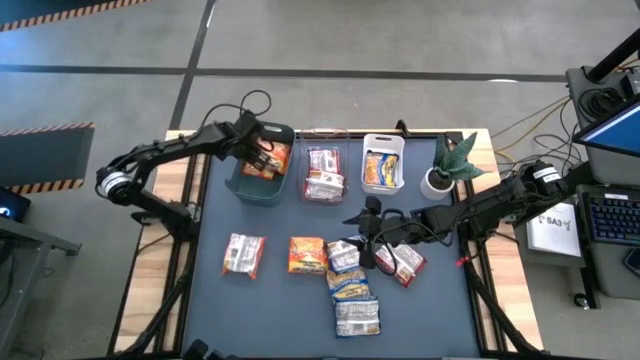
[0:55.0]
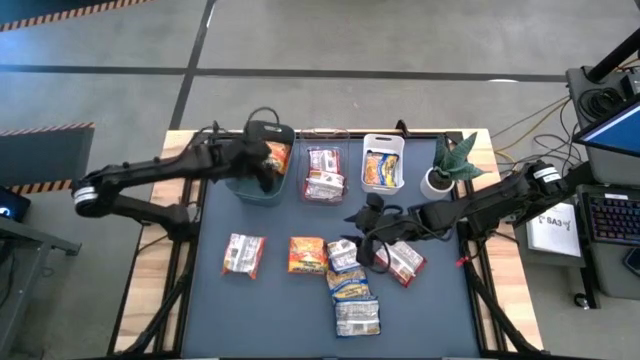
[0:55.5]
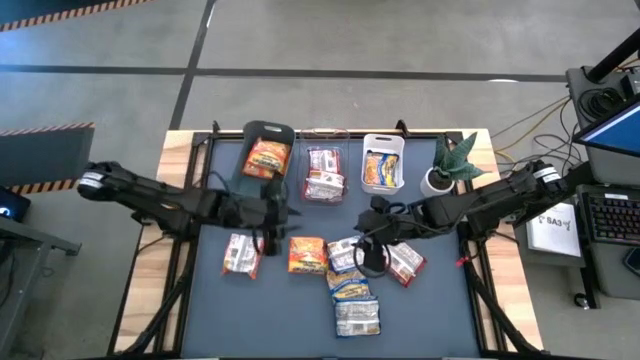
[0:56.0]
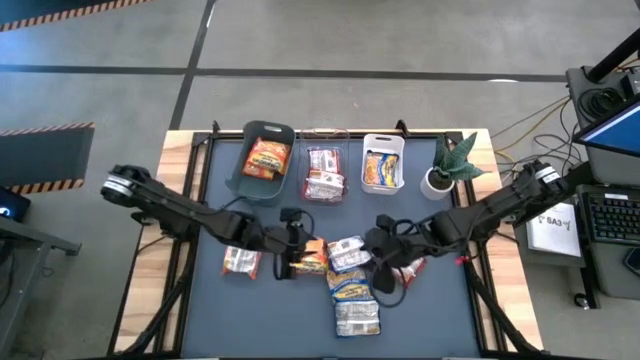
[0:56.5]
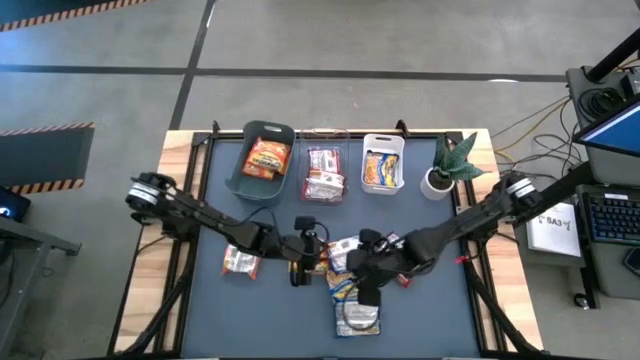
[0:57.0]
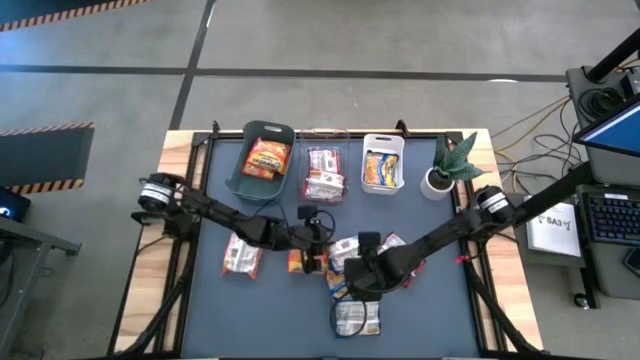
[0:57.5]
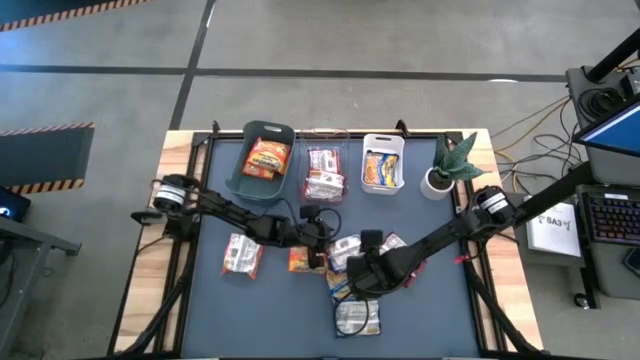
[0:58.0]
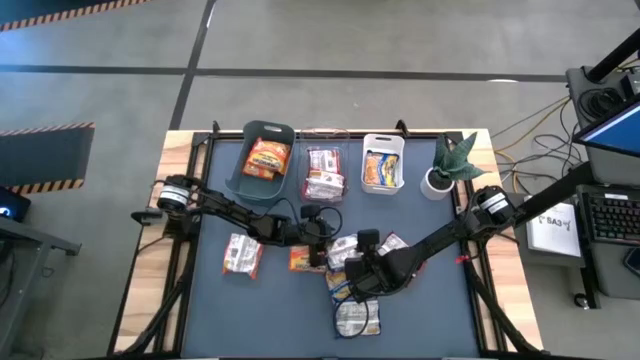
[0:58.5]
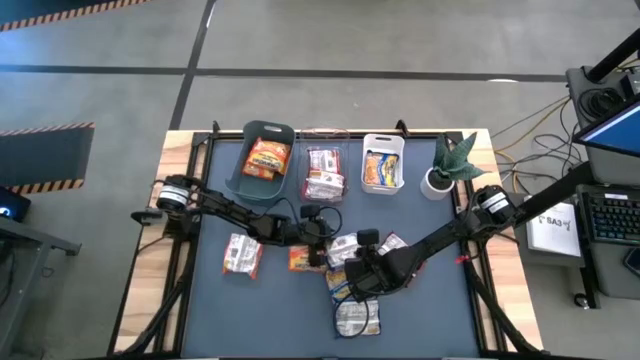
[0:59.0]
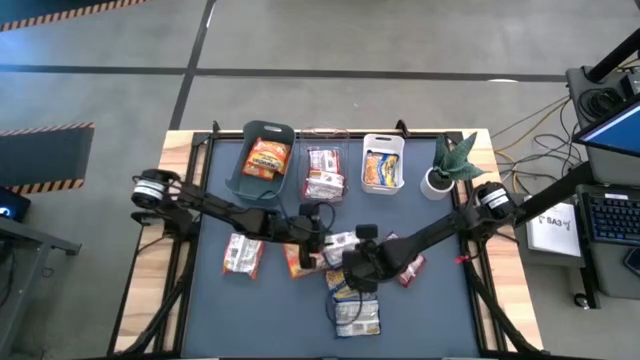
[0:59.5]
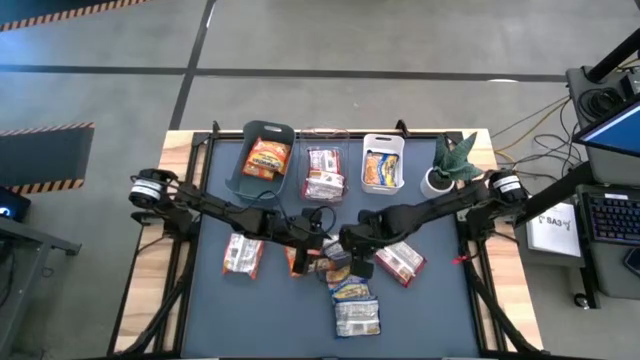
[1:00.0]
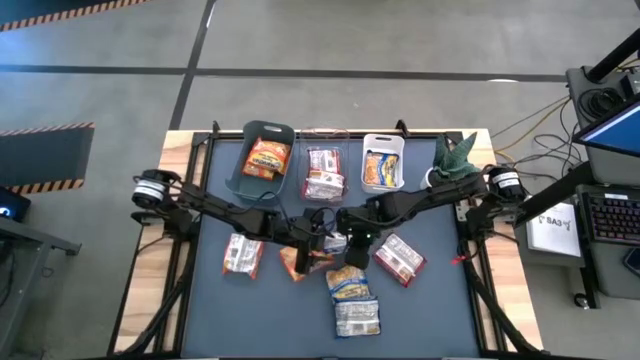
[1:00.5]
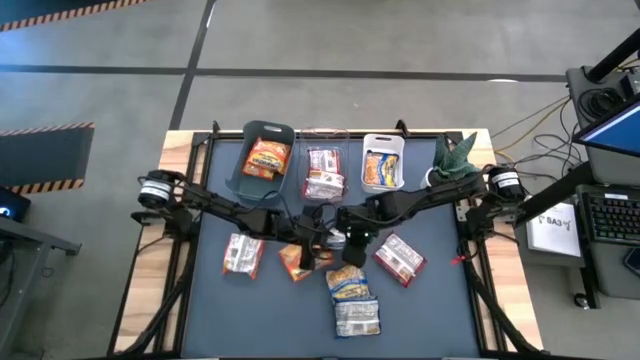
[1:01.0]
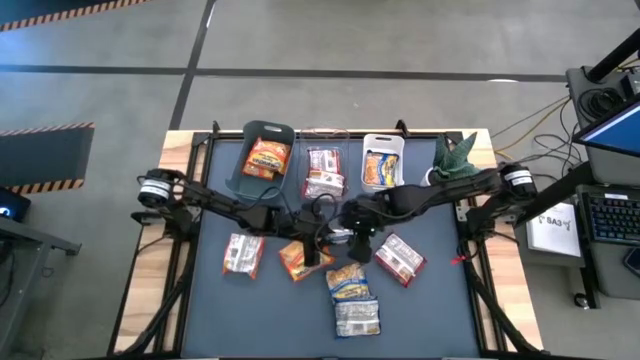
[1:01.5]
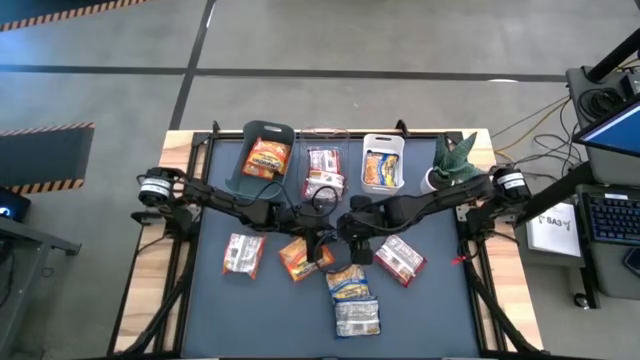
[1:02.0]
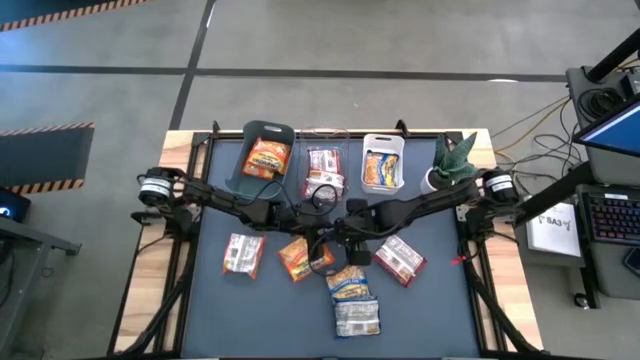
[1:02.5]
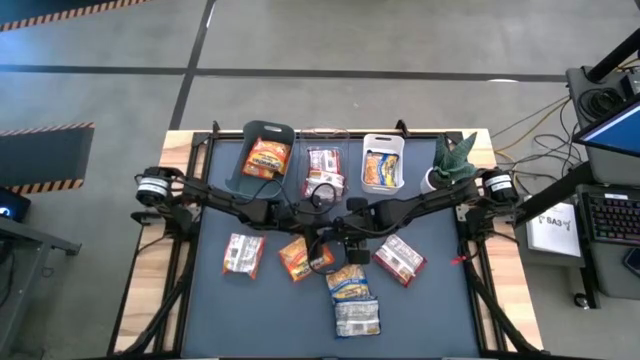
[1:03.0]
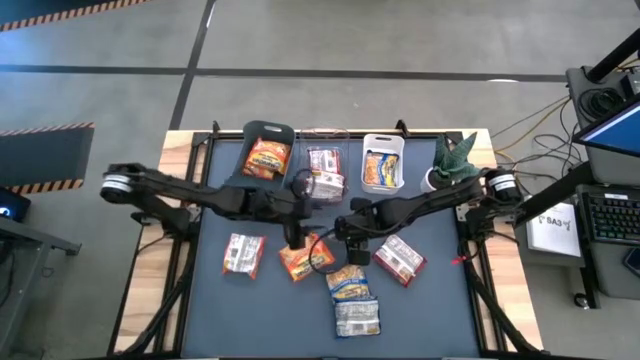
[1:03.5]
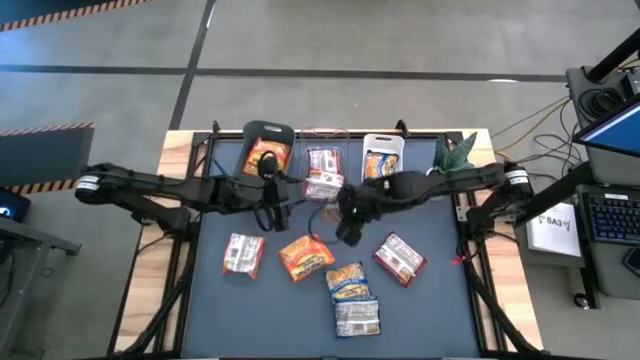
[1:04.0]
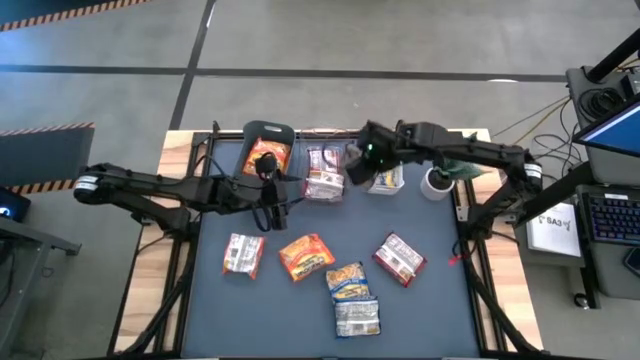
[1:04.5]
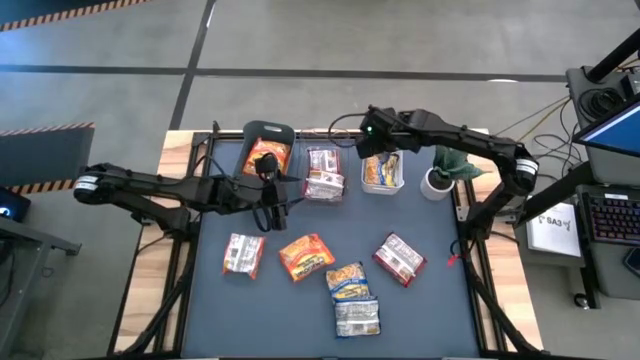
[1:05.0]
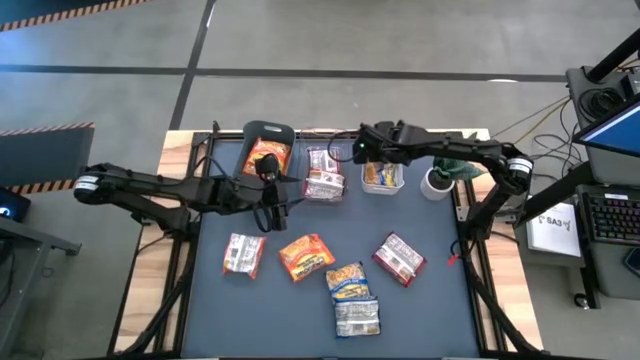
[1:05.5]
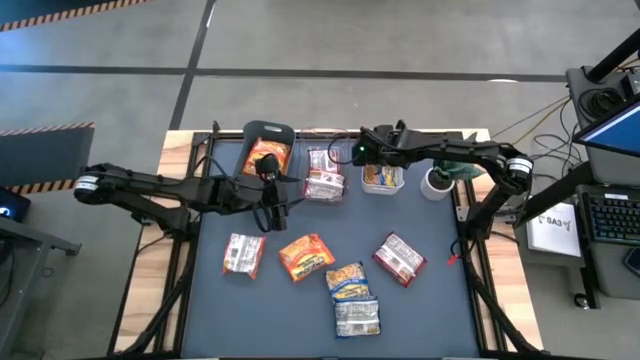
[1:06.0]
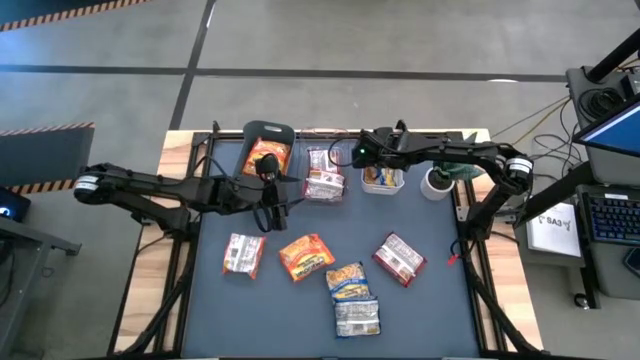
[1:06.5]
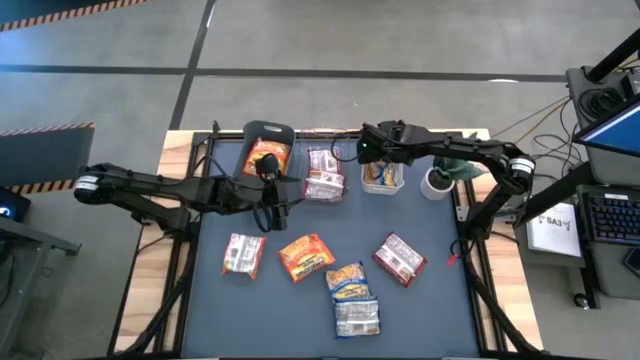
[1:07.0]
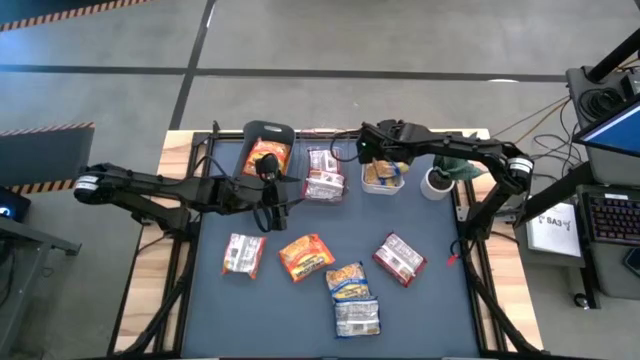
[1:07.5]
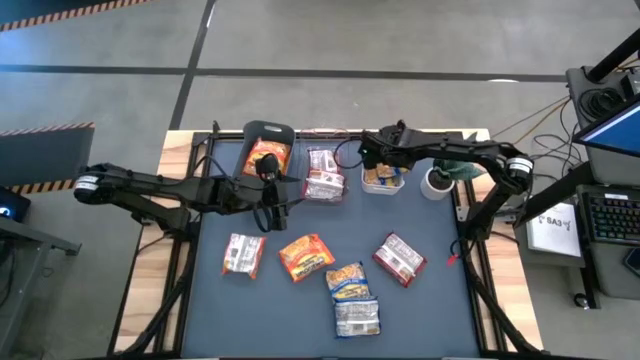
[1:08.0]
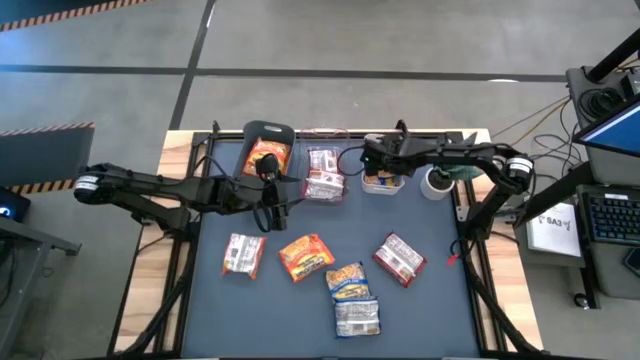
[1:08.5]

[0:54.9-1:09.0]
Task: Sort Maruchan noodles
Put the blue noodle pack into the white bin
